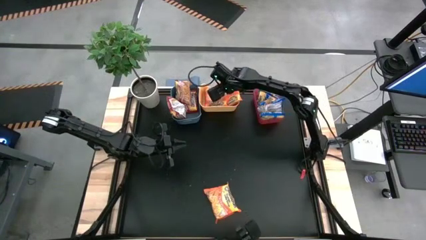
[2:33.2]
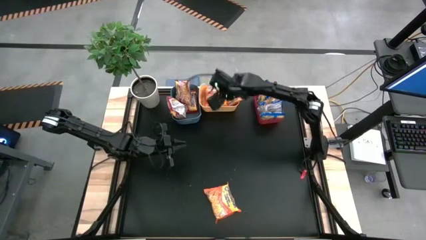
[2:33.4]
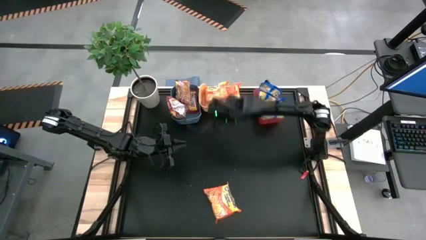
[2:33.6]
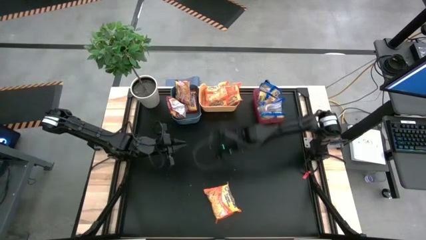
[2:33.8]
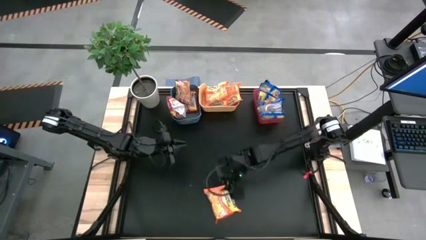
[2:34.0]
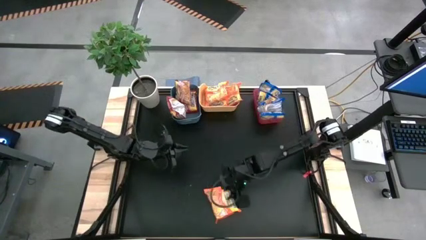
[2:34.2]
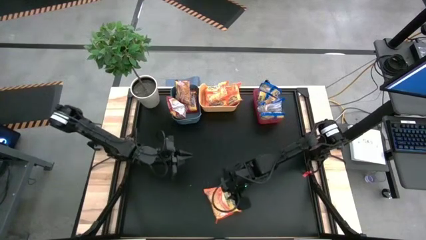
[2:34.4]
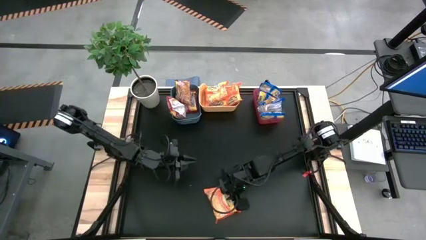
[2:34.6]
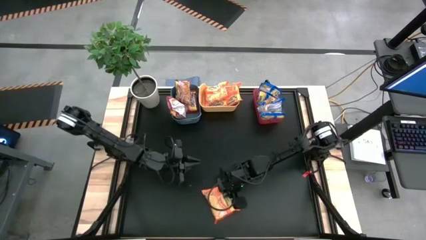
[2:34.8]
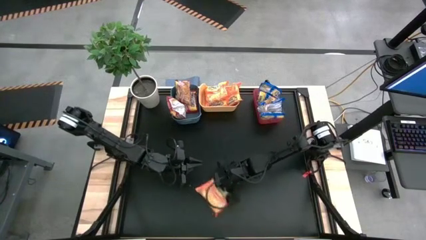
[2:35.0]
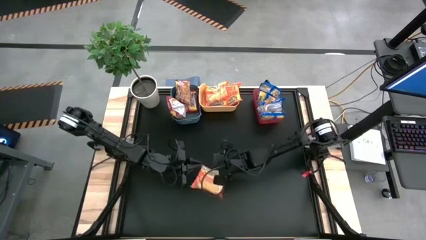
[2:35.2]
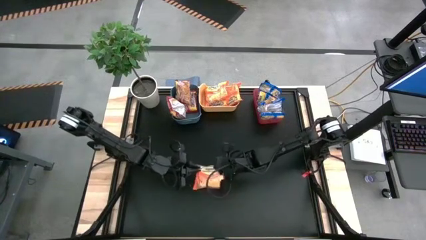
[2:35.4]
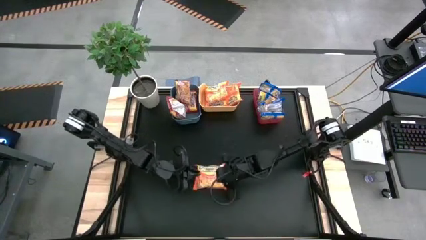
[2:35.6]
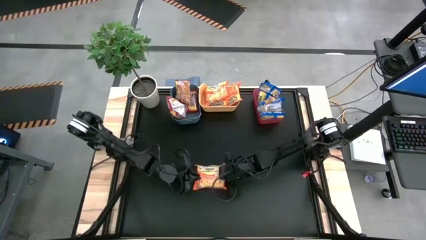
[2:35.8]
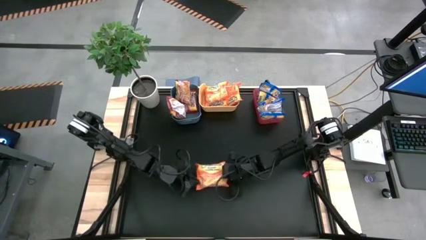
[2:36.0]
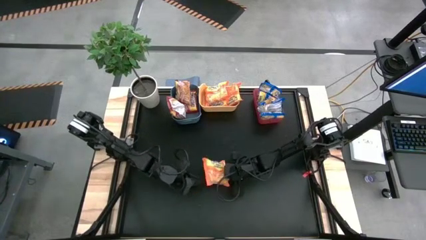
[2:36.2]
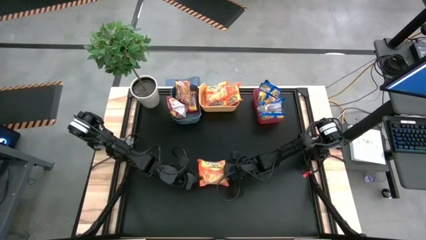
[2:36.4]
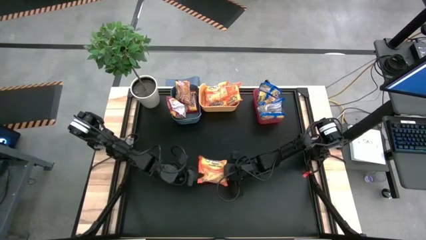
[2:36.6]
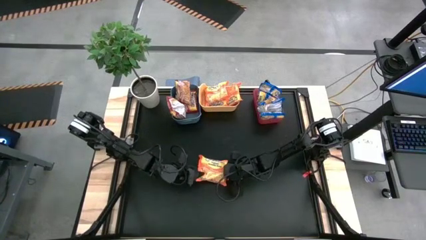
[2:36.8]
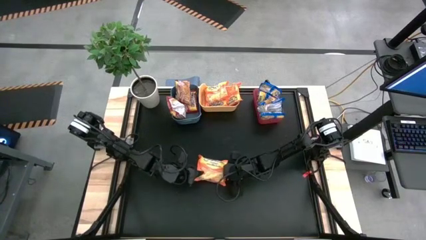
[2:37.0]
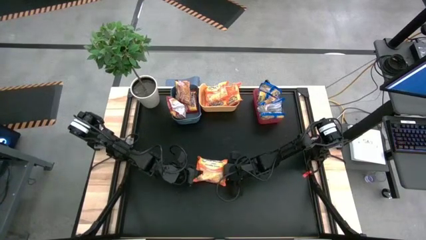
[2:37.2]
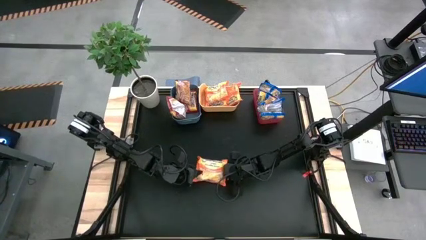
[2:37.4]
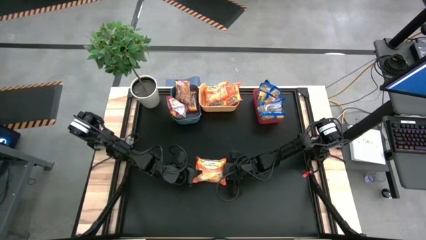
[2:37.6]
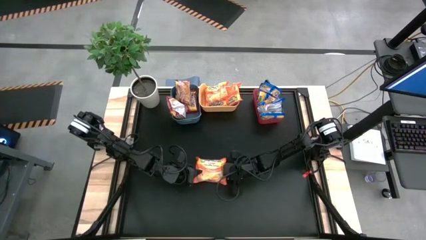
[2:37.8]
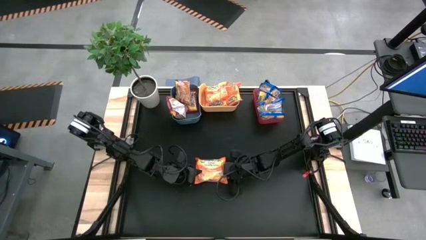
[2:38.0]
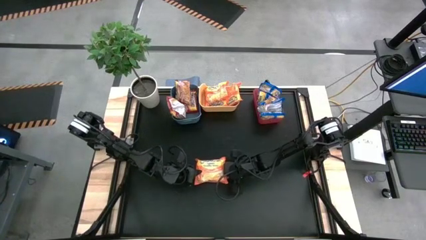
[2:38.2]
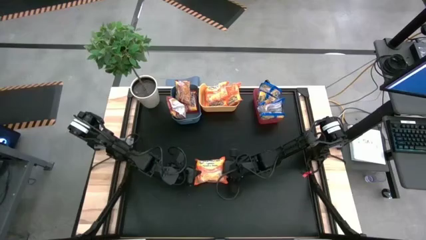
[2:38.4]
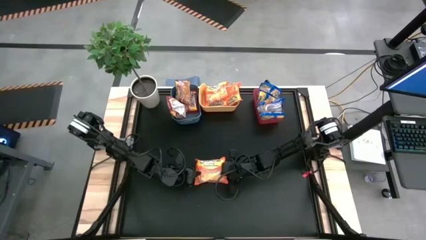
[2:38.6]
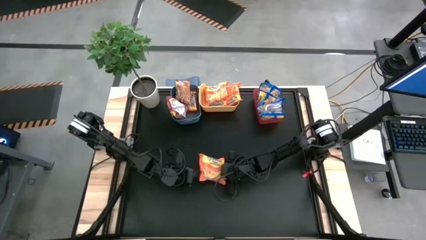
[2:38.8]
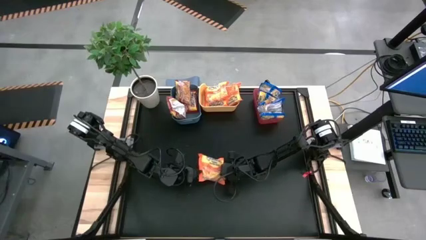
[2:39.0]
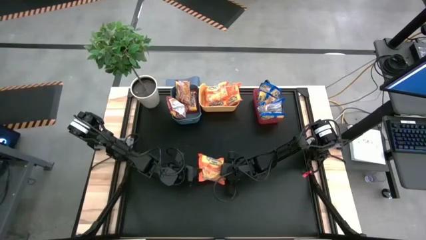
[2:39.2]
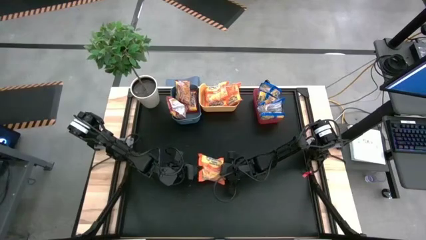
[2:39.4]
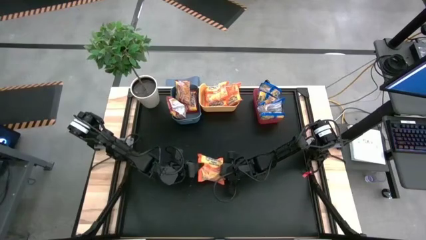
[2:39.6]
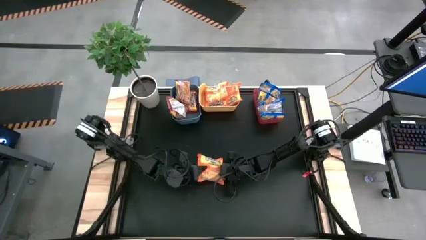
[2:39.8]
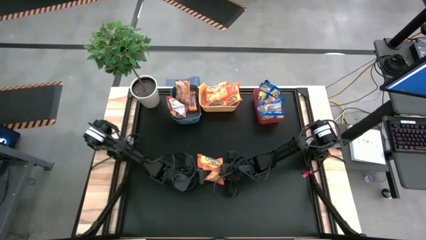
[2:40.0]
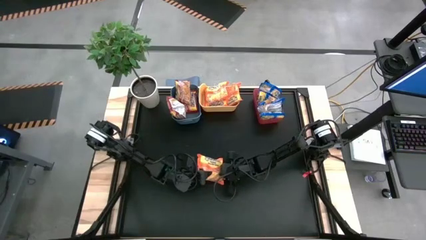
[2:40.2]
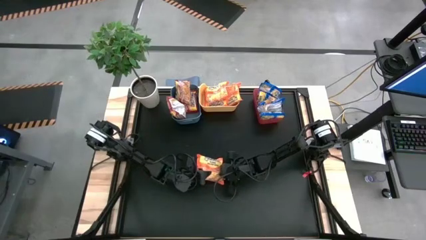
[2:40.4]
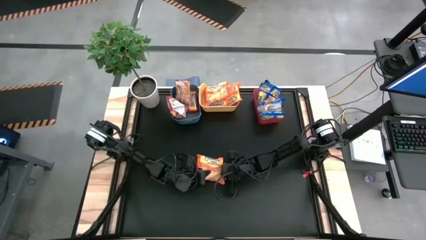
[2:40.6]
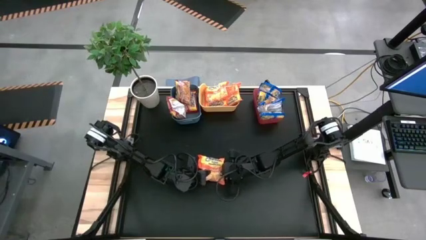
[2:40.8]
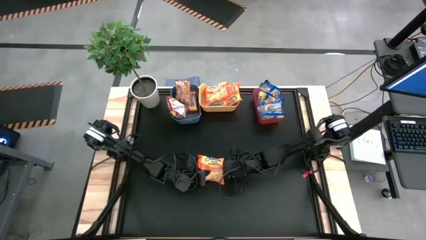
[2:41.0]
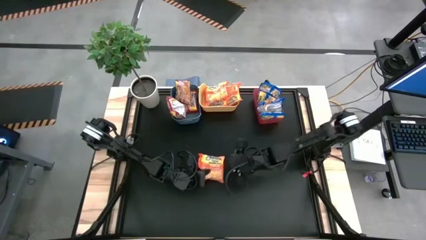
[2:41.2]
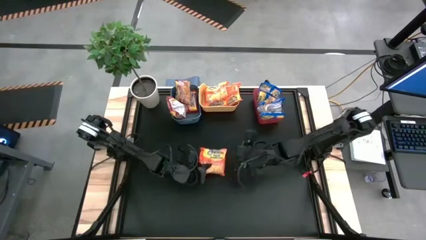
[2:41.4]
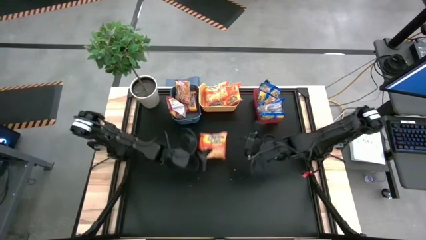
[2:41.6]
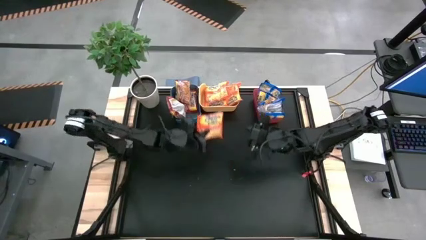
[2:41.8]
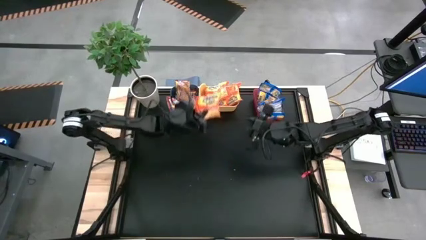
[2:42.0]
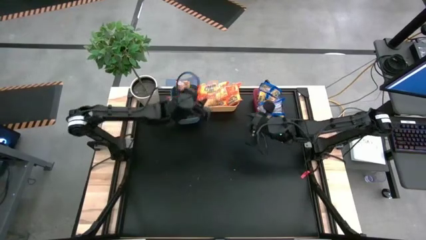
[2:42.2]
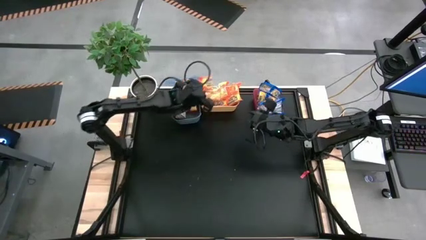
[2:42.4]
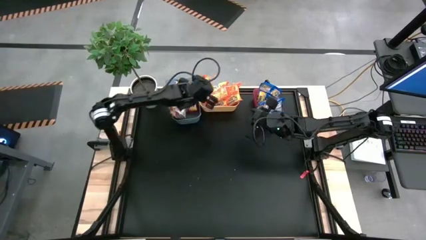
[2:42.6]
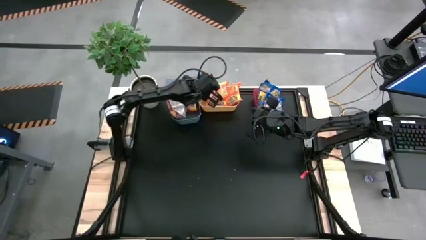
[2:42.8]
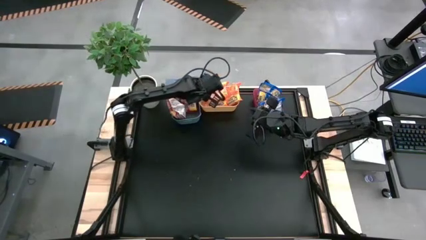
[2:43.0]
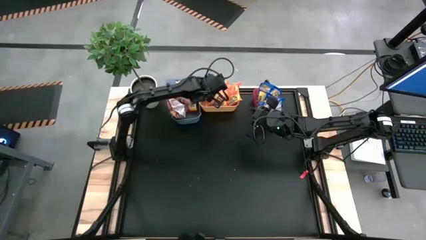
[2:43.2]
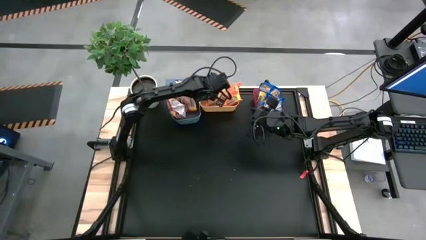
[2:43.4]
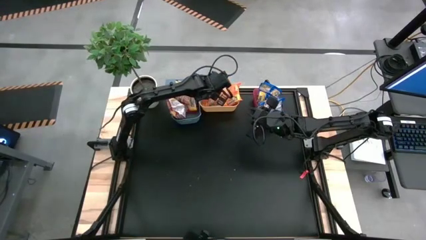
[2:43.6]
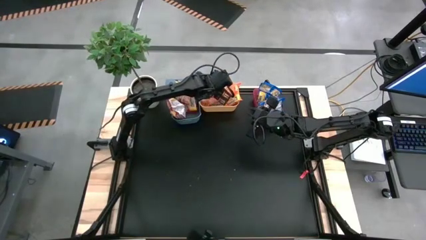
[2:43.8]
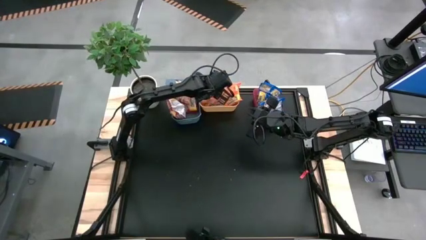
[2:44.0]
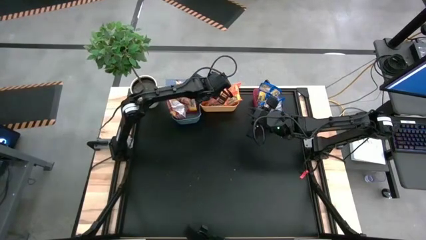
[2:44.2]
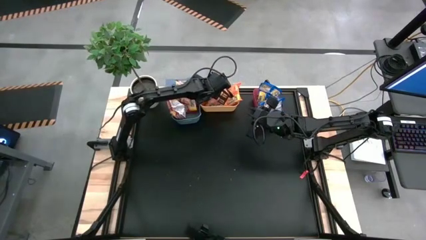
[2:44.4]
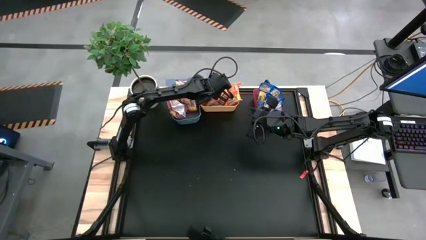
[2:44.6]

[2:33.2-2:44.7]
Task: Sort Maruchan noodles
Put the orange noodle pack into the yellow bin

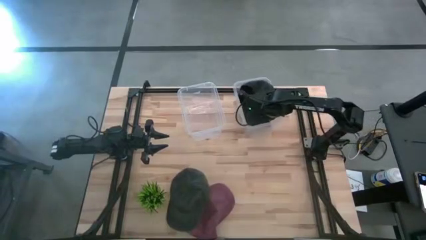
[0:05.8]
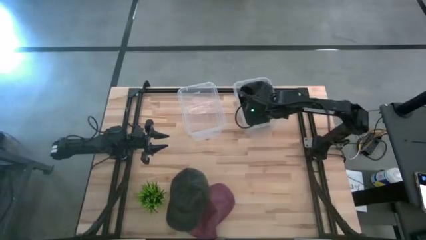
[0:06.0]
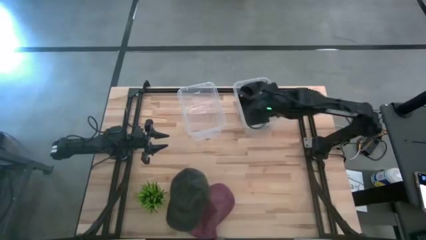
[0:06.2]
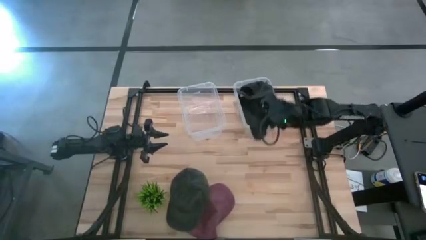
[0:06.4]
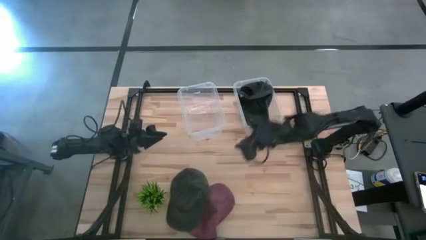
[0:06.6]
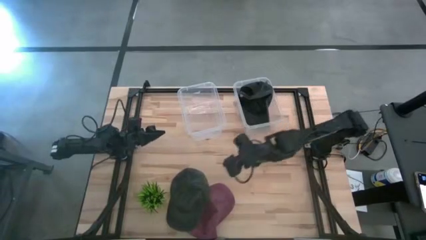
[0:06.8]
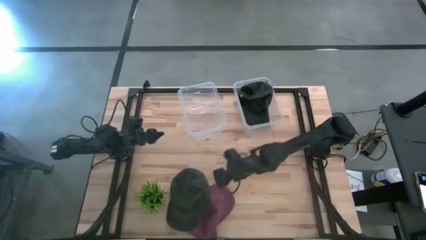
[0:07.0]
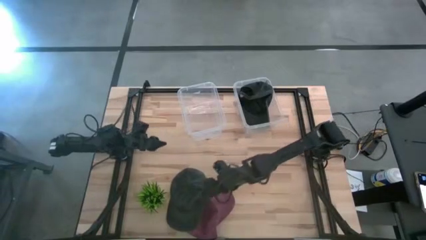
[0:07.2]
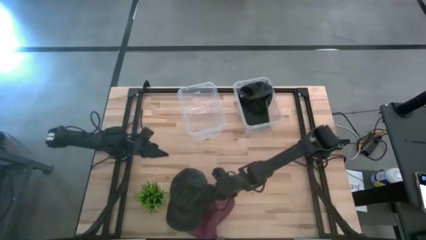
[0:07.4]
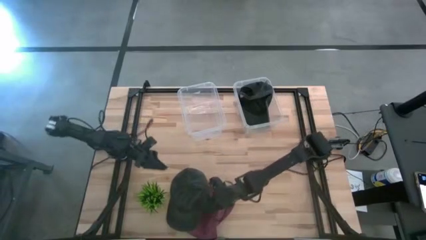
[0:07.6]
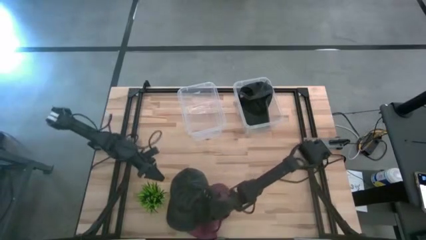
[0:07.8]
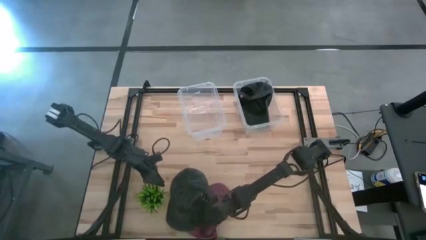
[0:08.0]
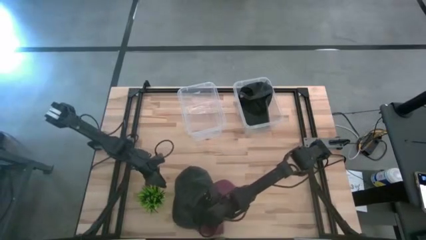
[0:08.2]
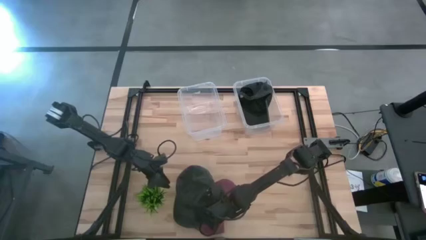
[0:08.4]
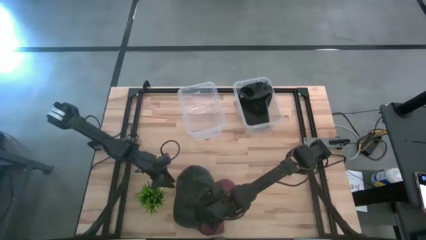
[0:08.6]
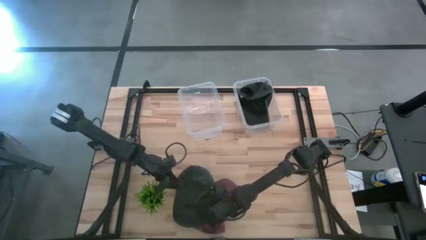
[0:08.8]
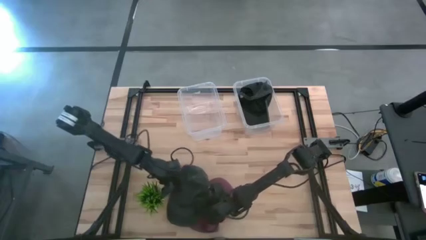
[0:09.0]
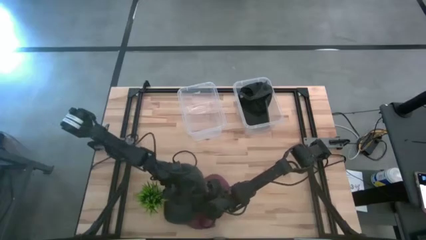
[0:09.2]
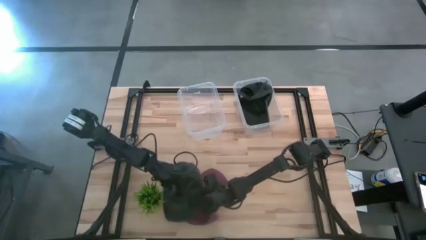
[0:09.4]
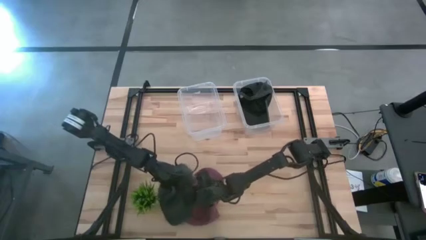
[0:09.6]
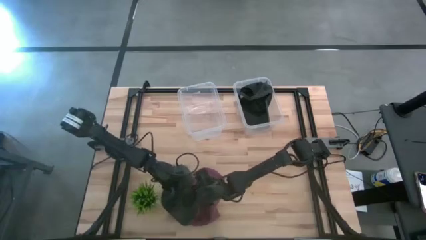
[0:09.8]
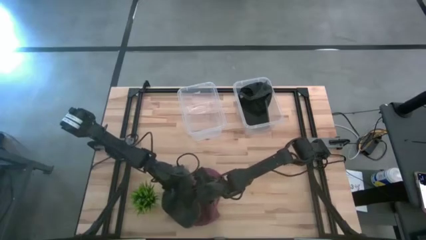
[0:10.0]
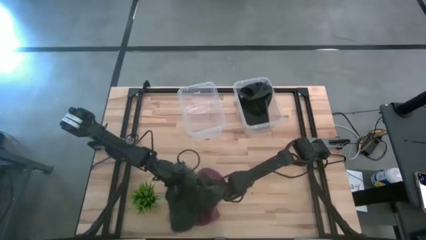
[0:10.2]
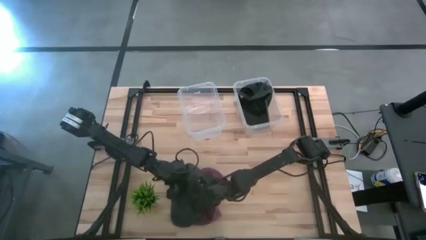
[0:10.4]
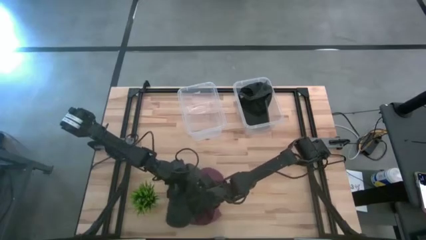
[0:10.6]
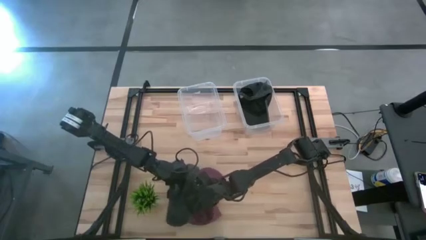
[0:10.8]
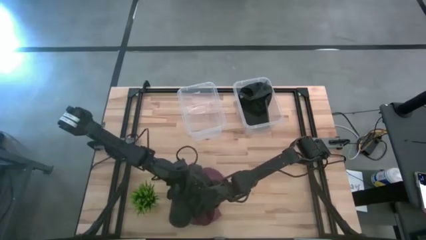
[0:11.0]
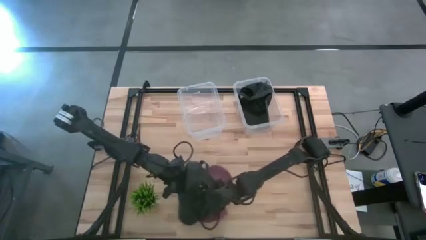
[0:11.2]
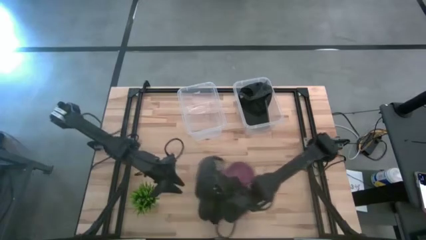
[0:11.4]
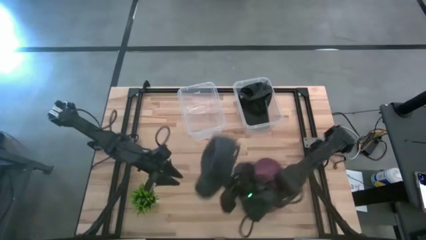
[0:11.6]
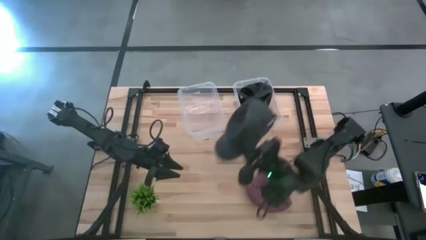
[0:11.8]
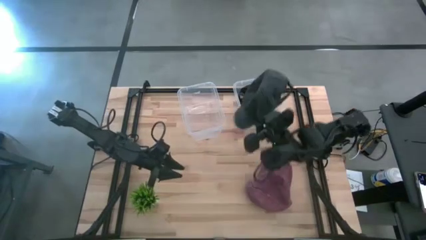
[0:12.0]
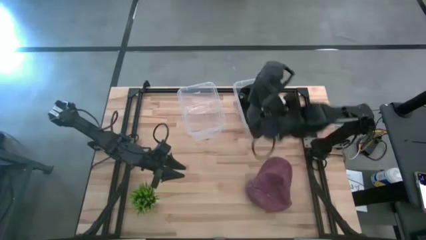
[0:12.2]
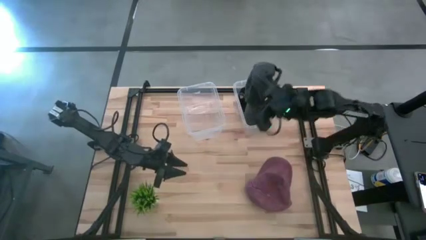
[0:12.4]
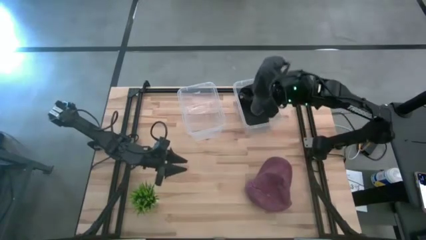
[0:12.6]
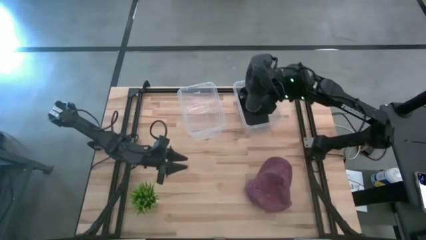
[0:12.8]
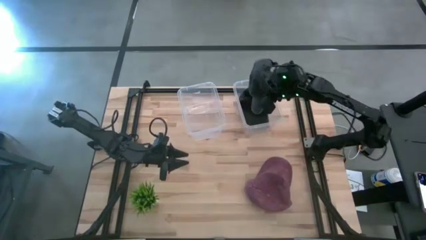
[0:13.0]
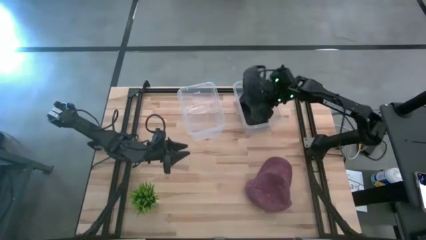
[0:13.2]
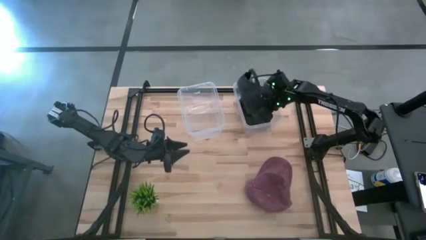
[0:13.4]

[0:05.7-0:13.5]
Task: Pick & Place hat
Put the black cap into the right transparent bin
